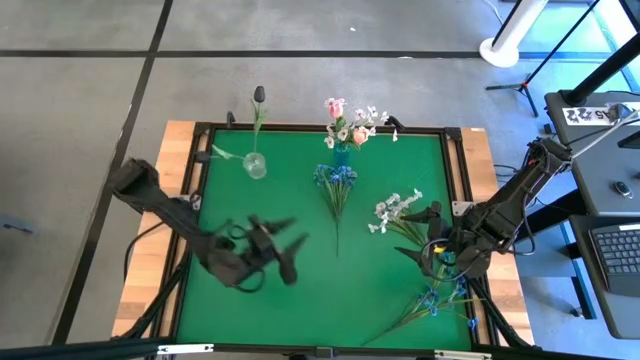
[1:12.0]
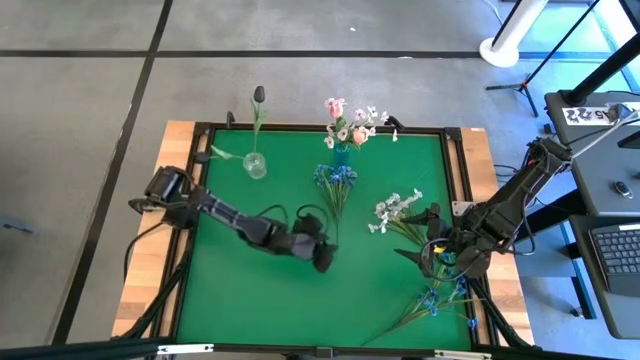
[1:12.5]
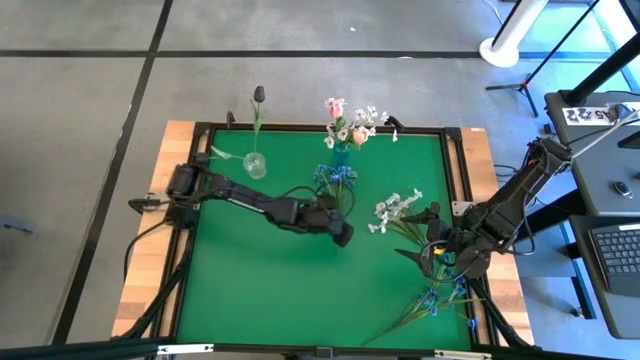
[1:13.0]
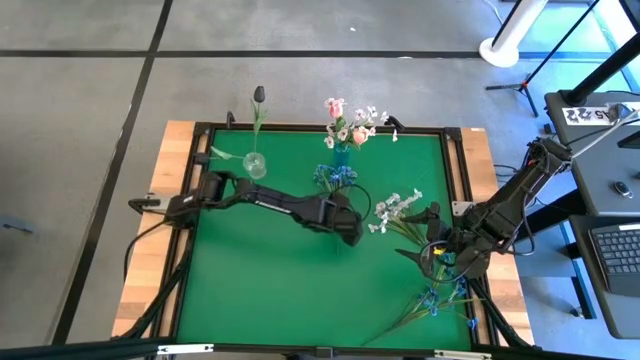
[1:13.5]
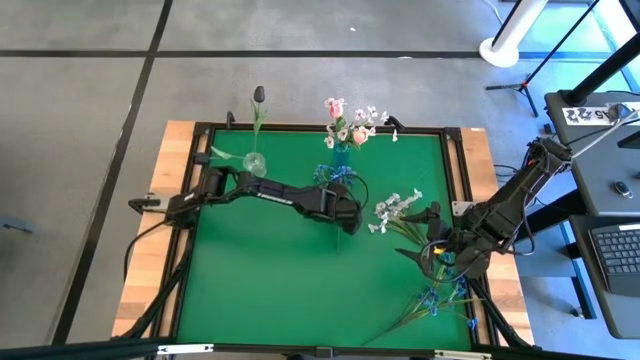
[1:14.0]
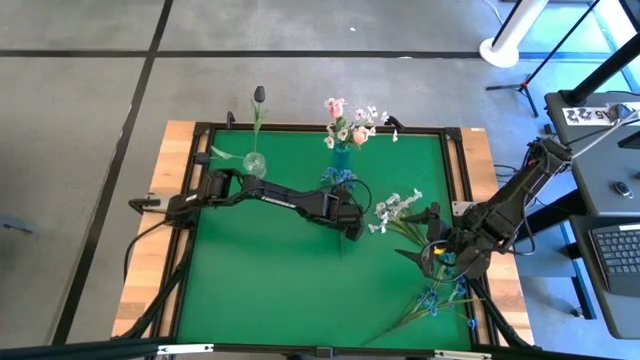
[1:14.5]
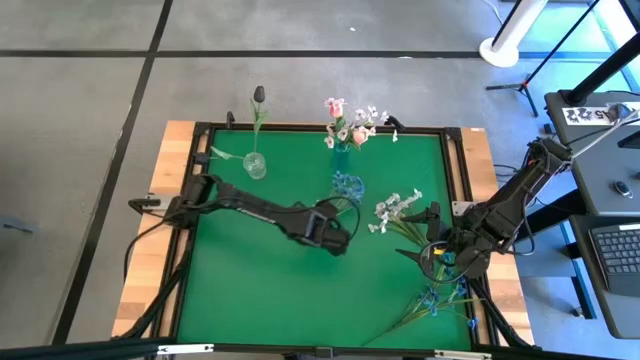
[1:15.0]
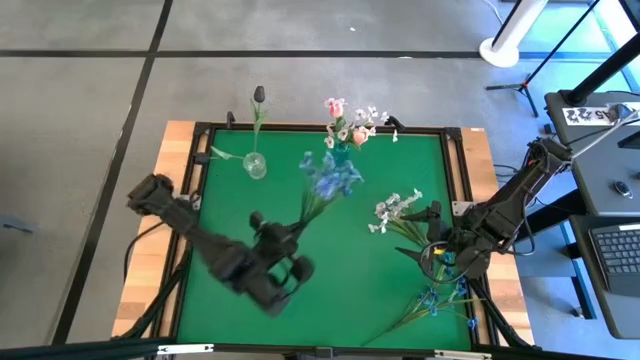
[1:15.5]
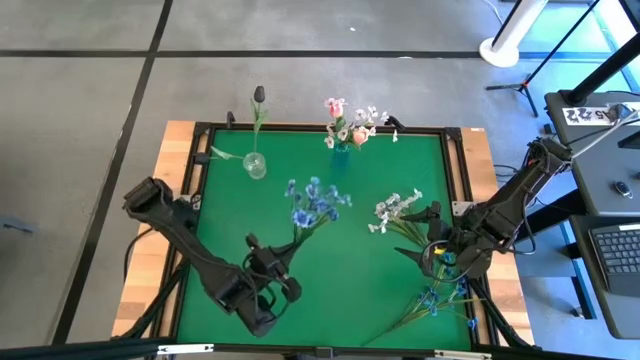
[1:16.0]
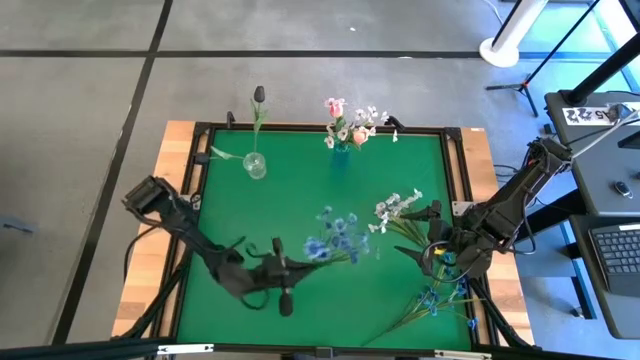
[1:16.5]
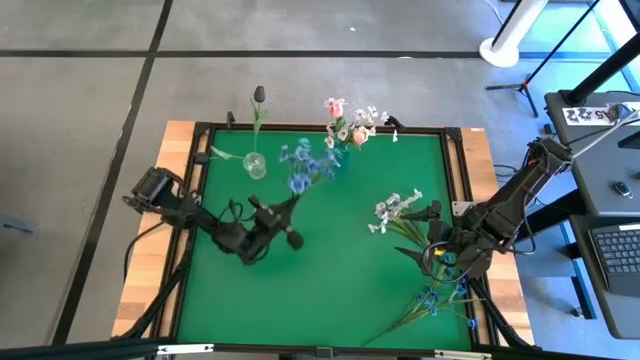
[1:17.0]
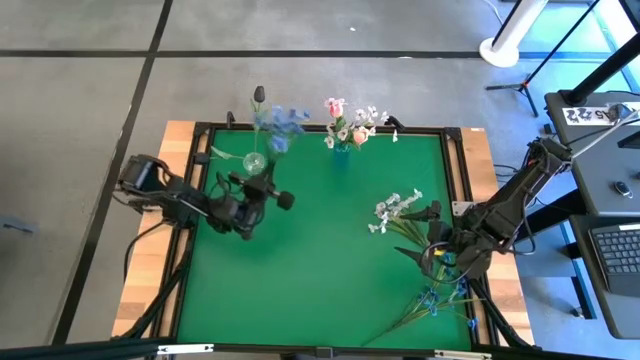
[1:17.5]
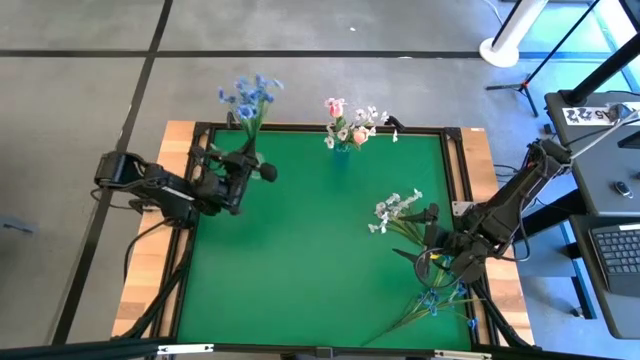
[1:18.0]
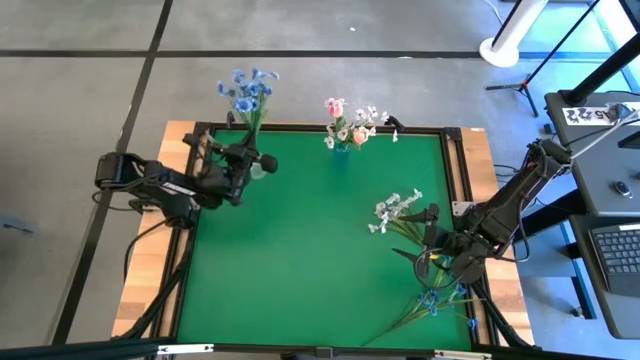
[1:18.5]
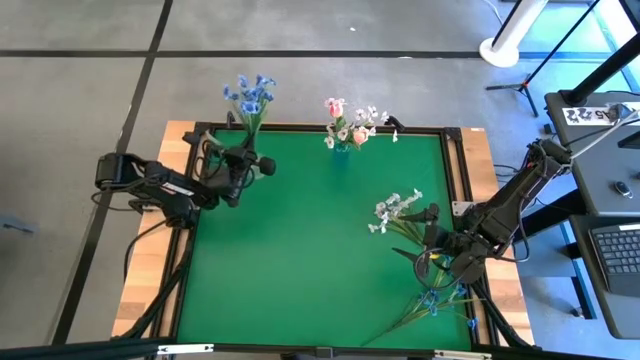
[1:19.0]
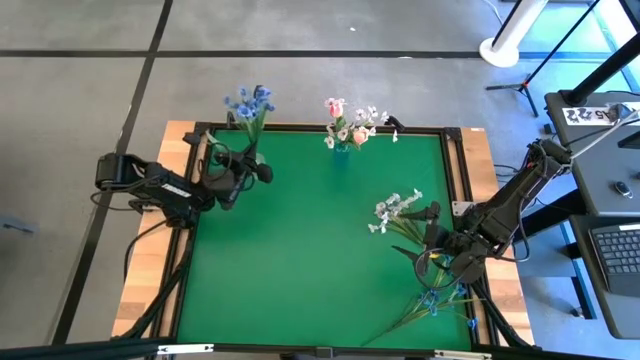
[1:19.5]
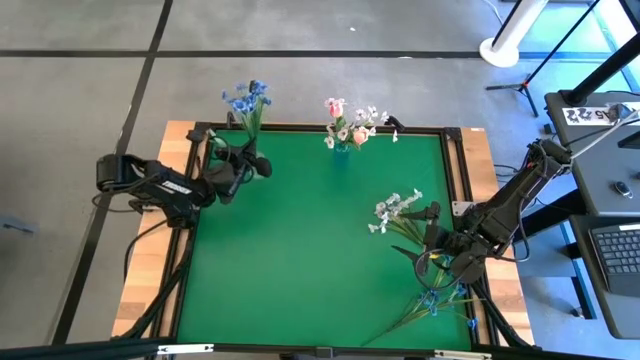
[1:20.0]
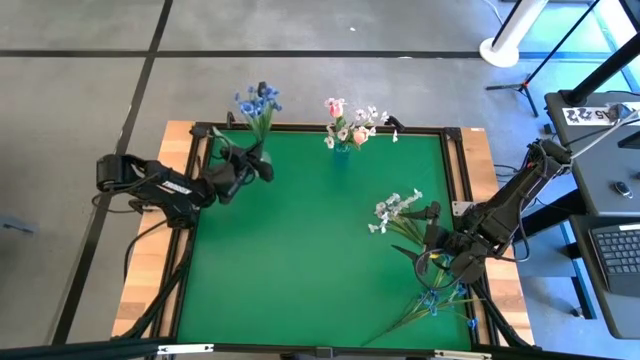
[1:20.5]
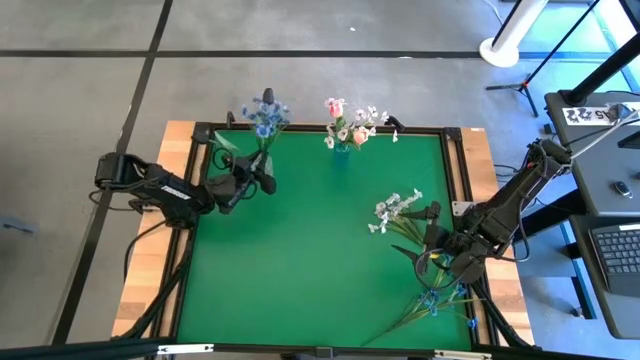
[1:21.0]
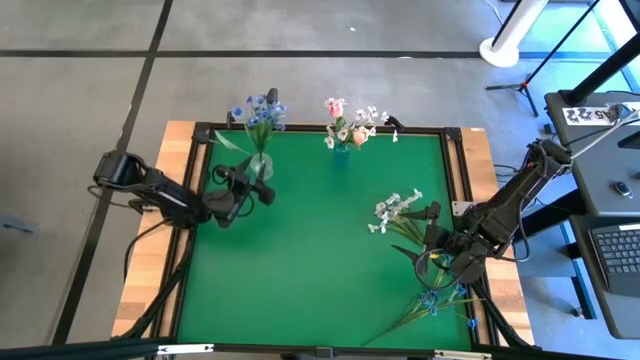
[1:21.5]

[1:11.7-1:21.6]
Task: Sort flowers into vase by color
Put the top blue flowers into the transparent vase

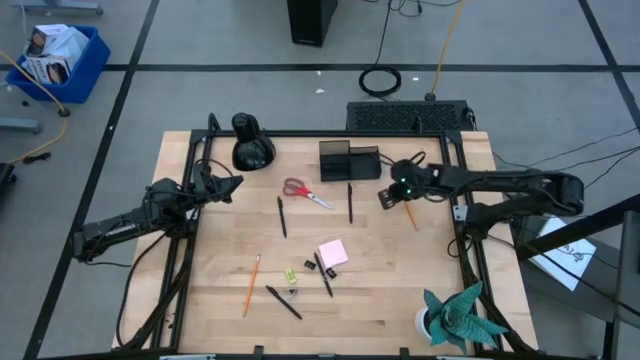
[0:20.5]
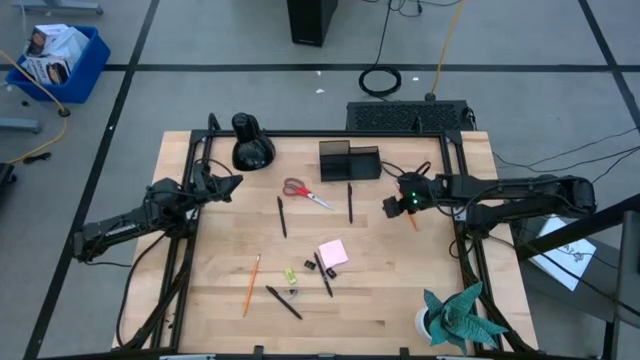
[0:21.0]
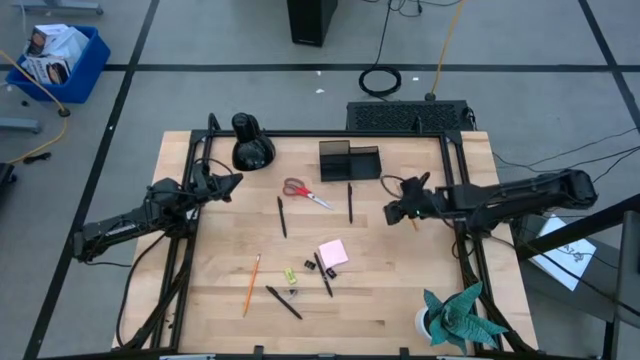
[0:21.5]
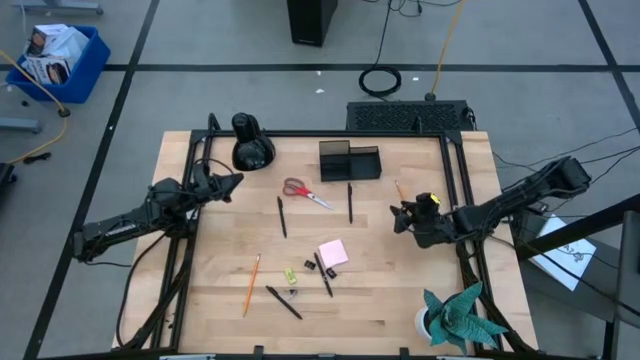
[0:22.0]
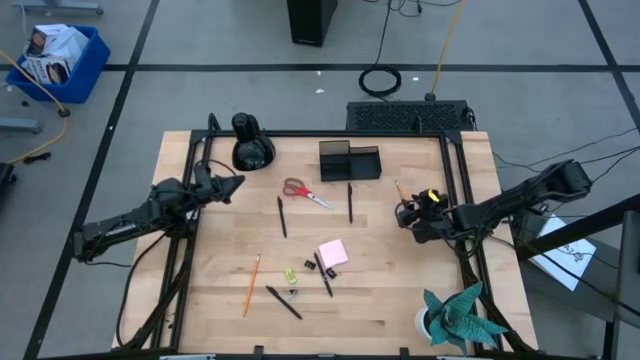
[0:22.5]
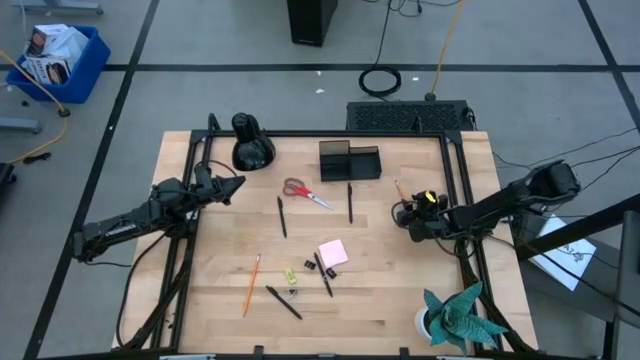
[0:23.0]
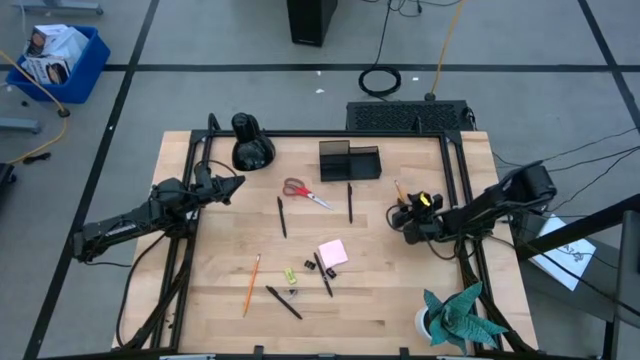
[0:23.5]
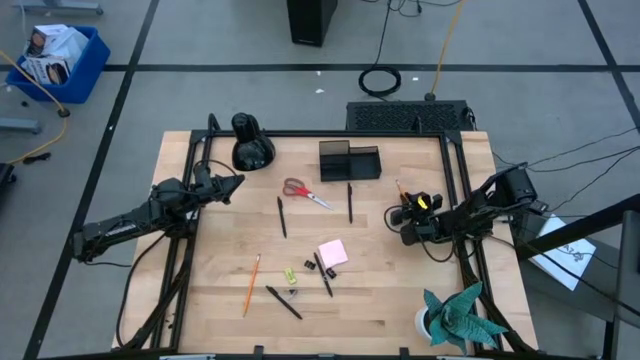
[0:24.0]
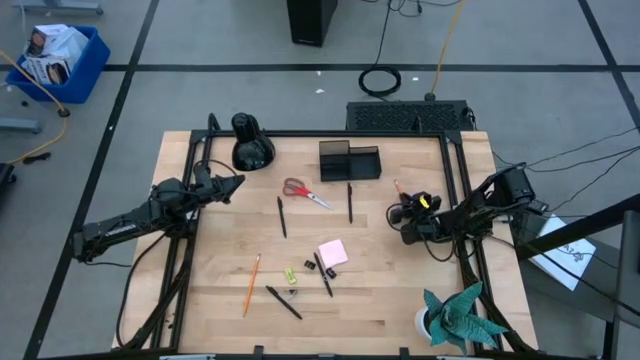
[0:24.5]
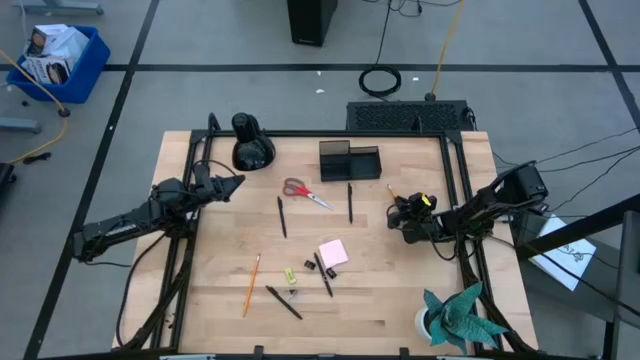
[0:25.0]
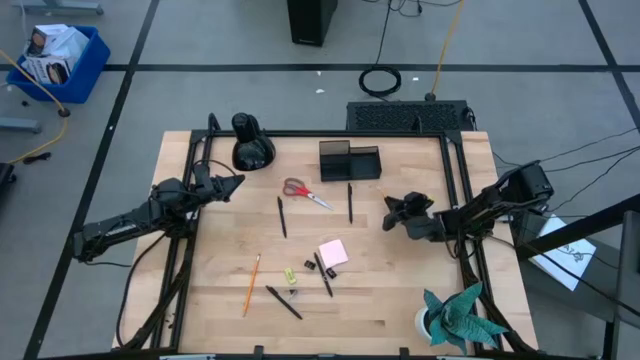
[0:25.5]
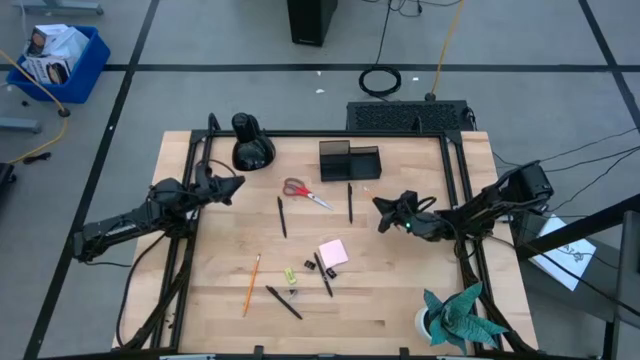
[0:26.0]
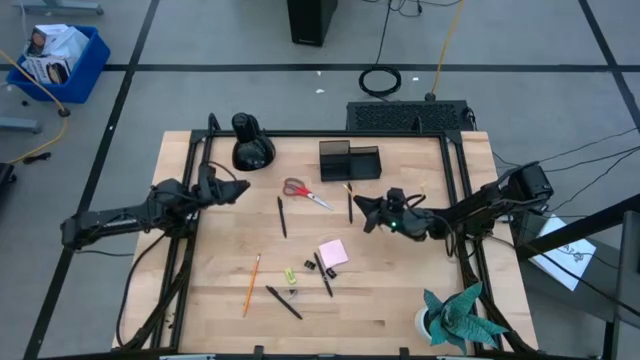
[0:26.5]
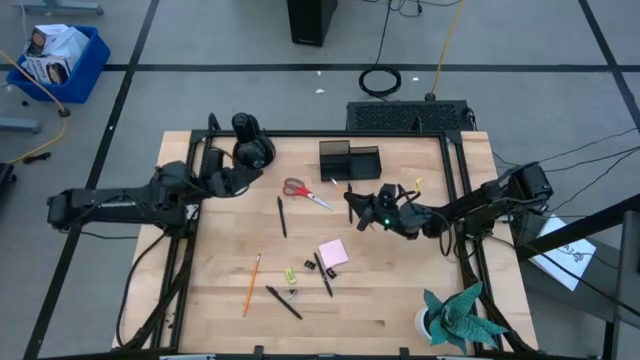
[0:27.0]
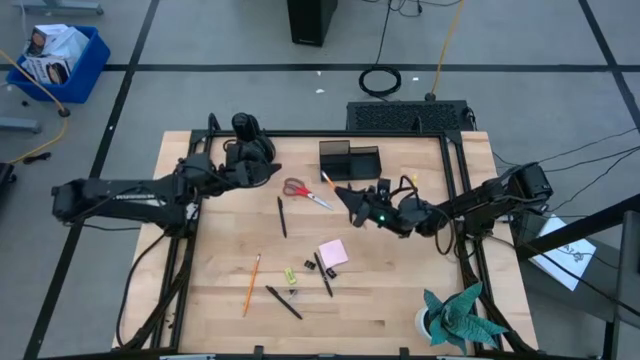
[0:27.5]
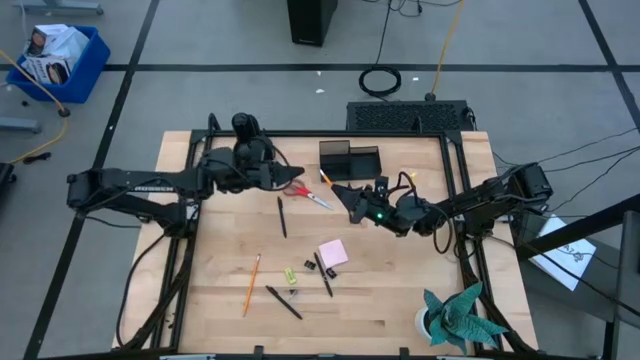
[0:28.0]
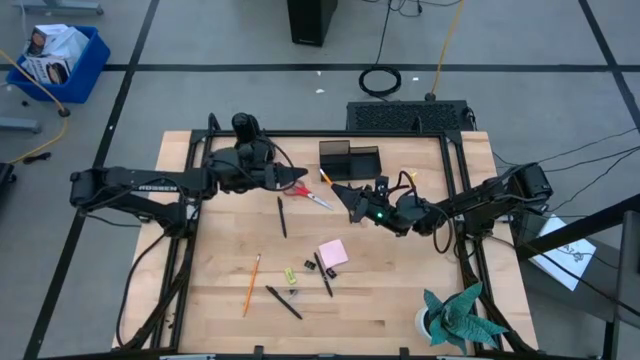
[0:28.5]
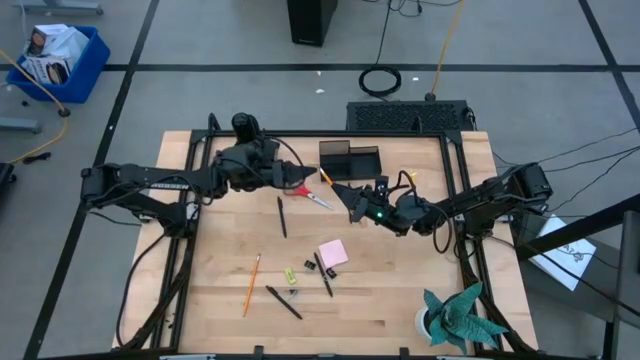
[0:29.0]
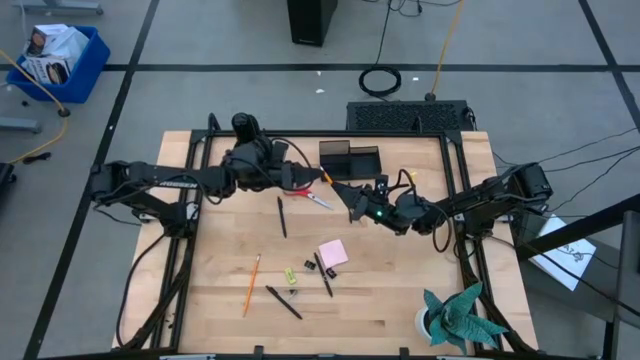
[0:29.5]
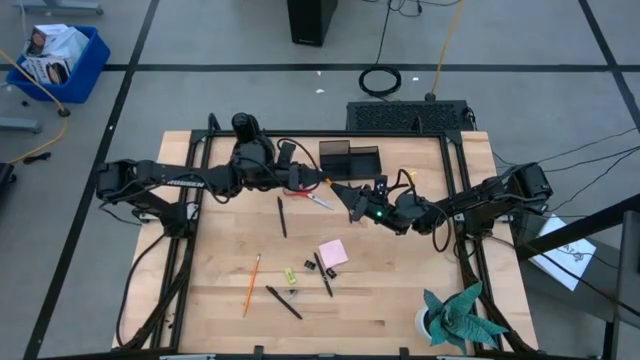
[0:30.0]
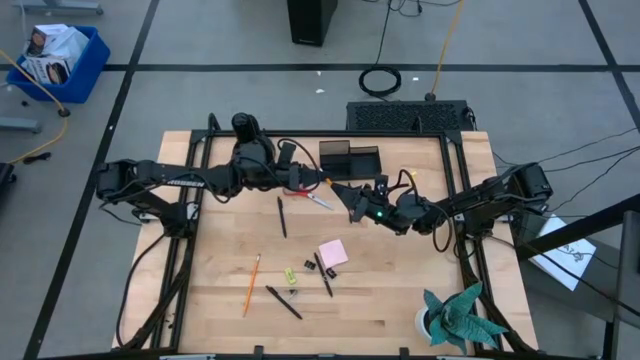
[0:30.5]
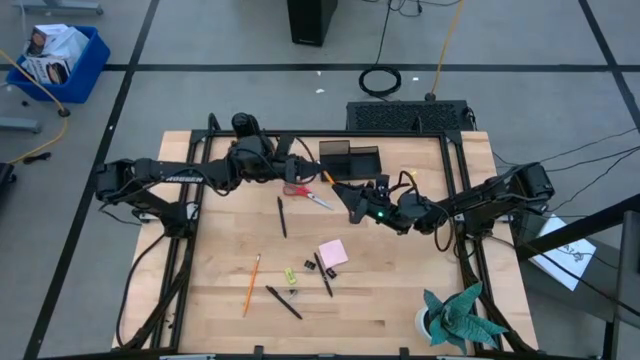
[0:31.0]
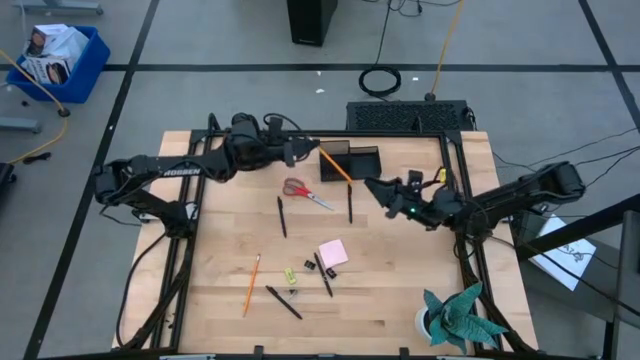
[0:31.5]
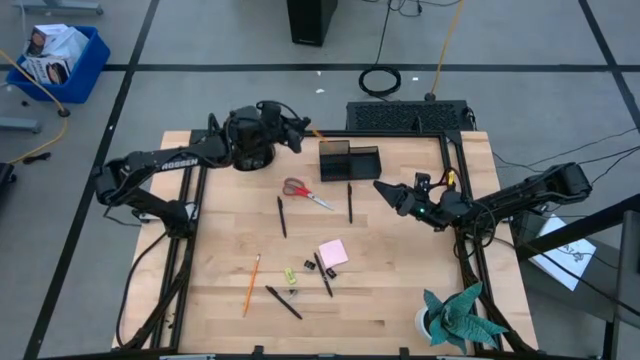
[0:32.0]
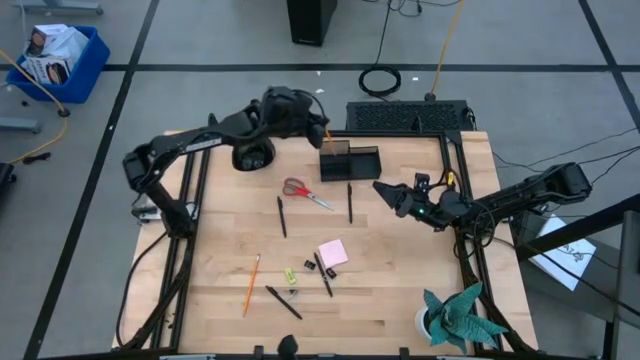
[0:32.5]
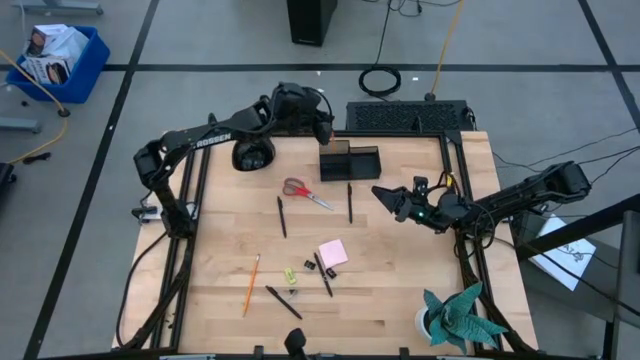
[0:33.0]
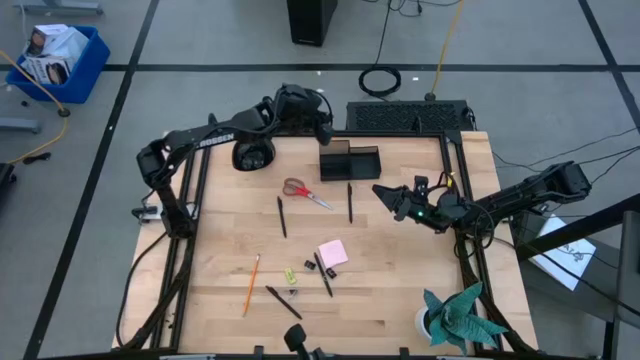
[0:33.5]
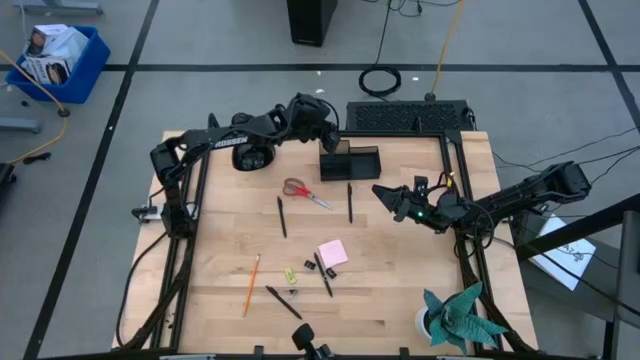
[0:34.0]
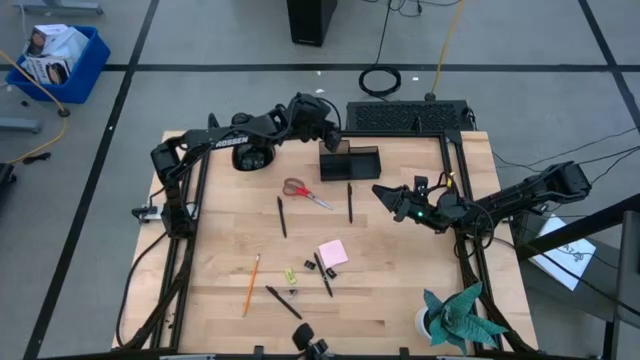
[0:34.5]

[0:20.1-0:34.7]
Task: Pick and place office supplies into organizer
Put the orange pencil into the black desk organizer
